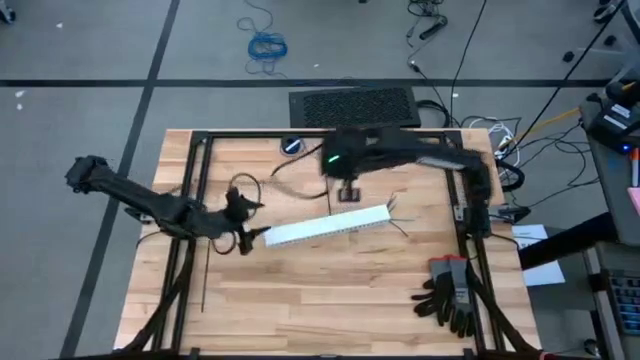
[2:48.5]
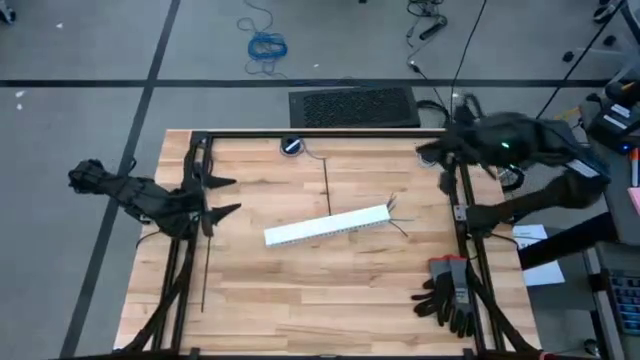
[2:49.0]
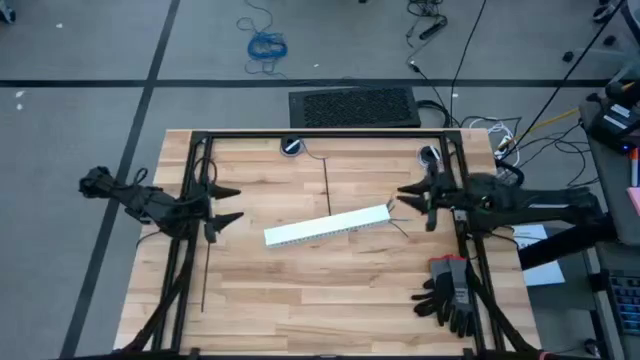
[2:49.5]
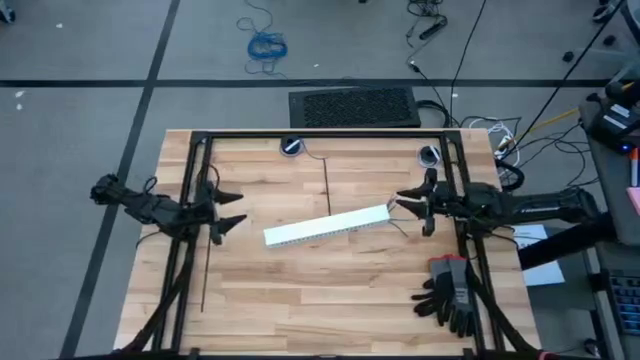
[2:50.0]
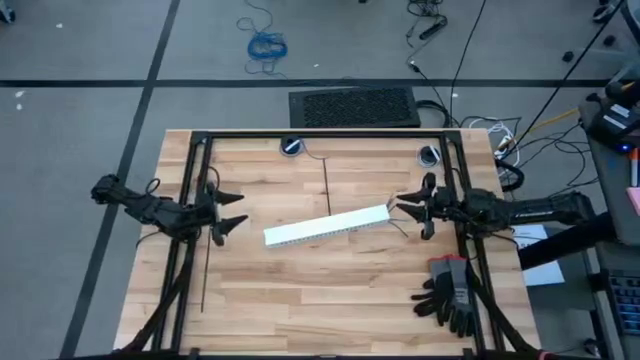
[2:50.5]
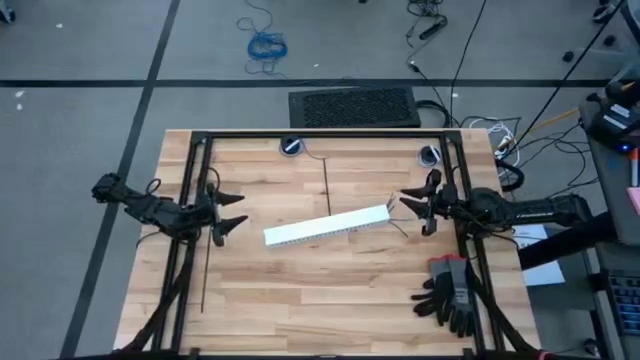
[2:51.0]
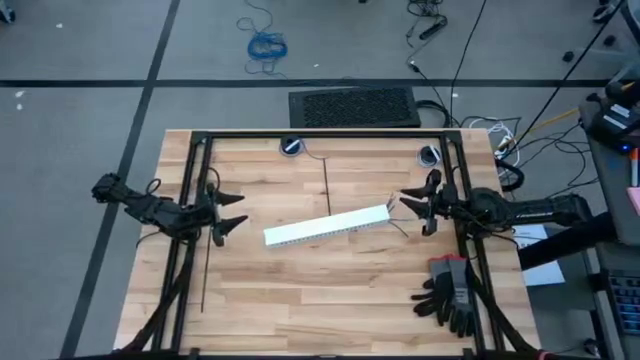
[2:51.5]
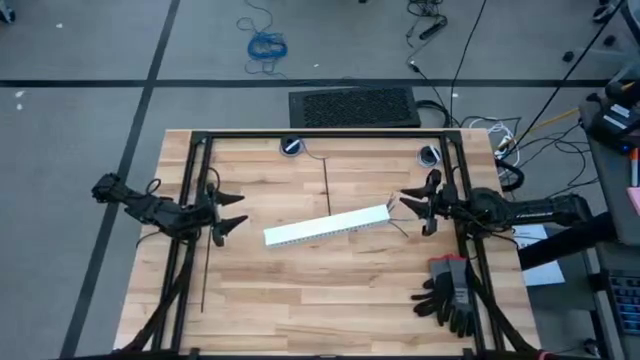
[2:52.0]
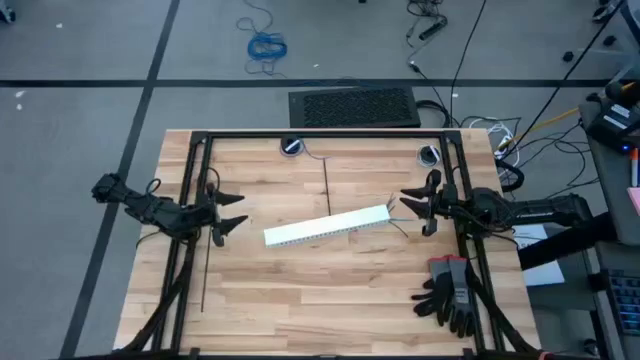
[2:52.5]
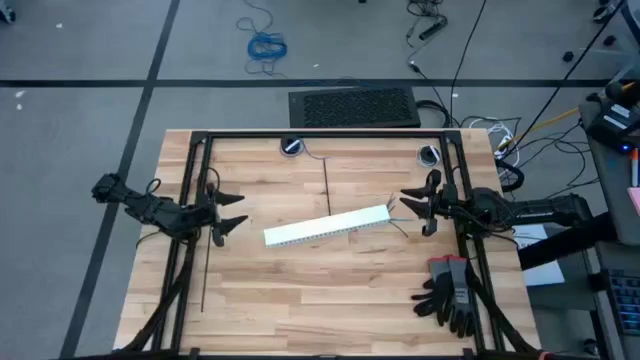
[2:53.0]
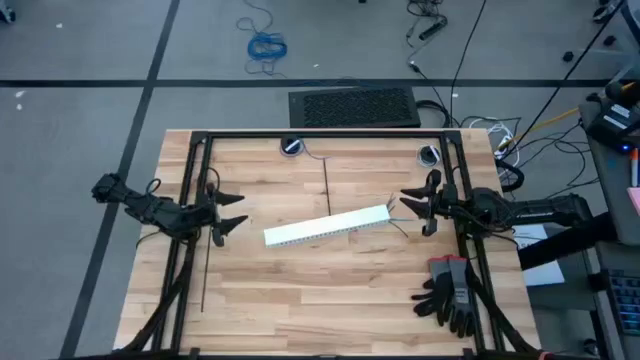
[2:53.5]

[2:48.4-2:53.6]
Task: Ziptie cables
Return to Home Position

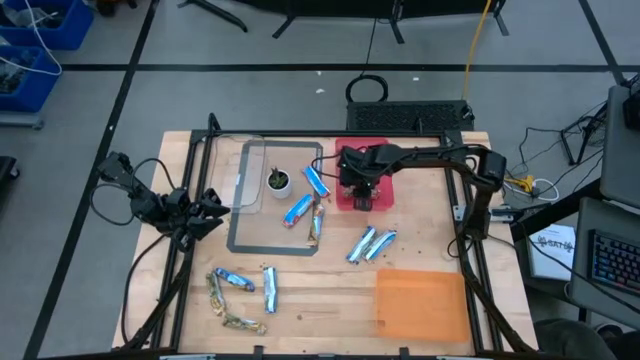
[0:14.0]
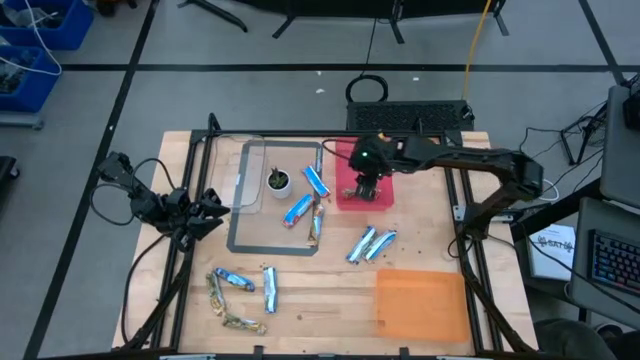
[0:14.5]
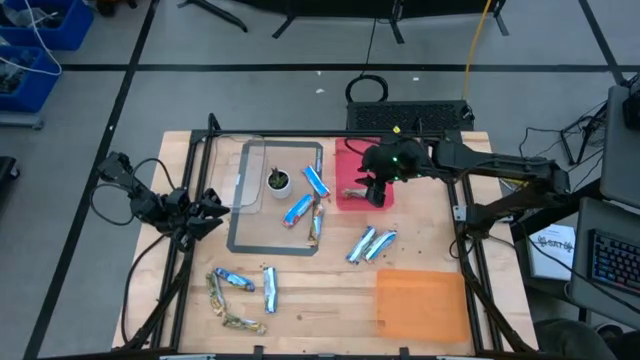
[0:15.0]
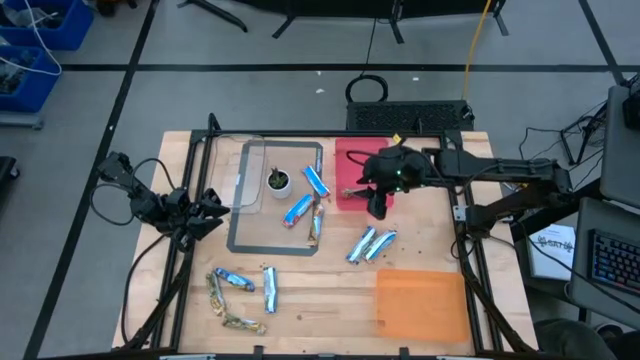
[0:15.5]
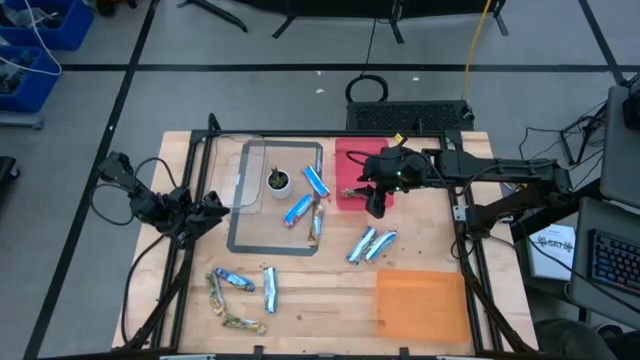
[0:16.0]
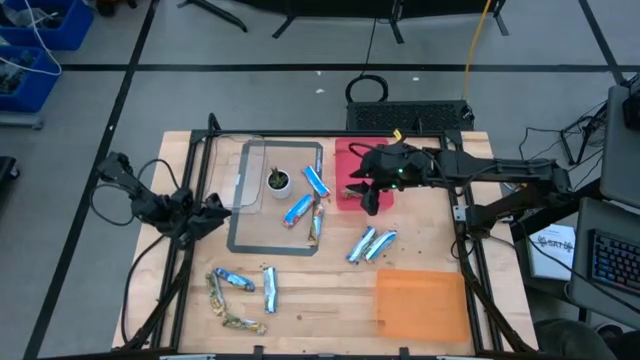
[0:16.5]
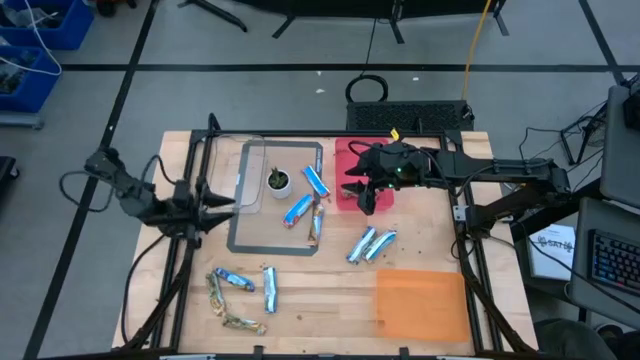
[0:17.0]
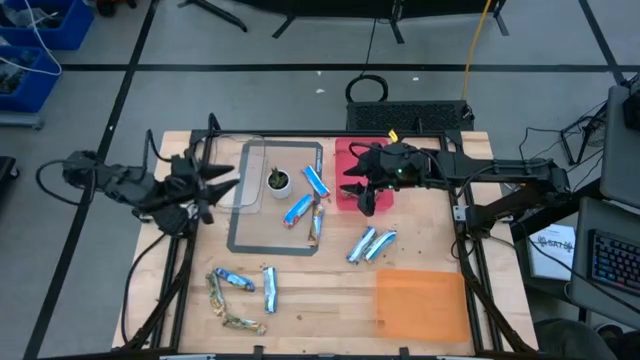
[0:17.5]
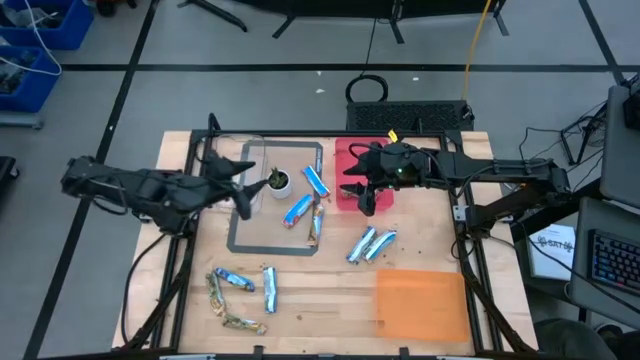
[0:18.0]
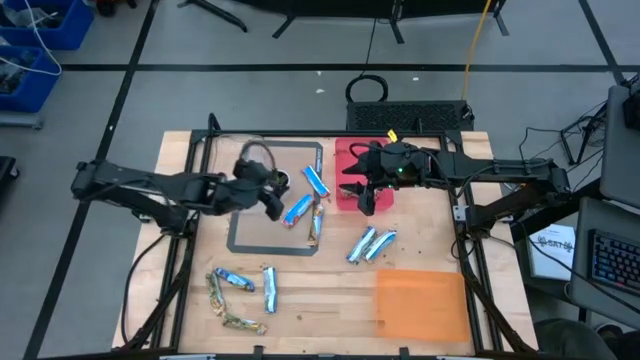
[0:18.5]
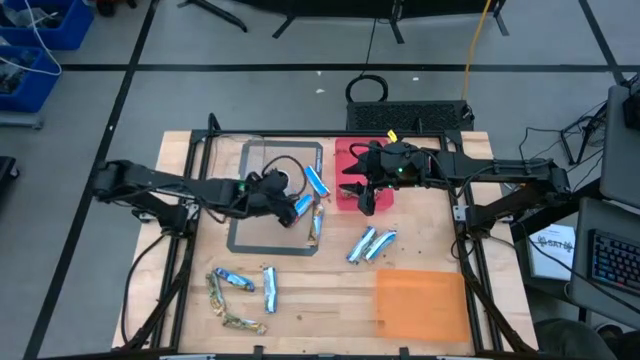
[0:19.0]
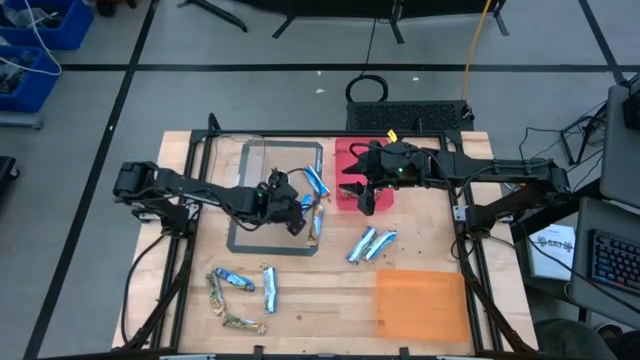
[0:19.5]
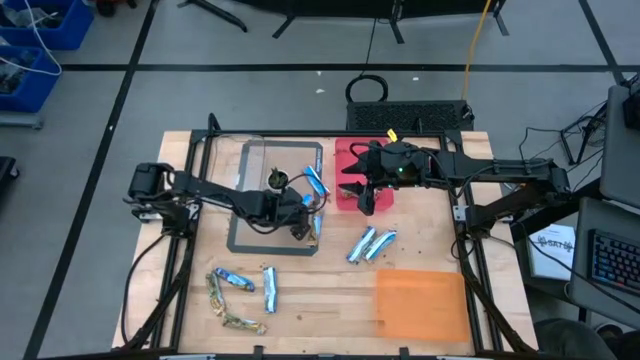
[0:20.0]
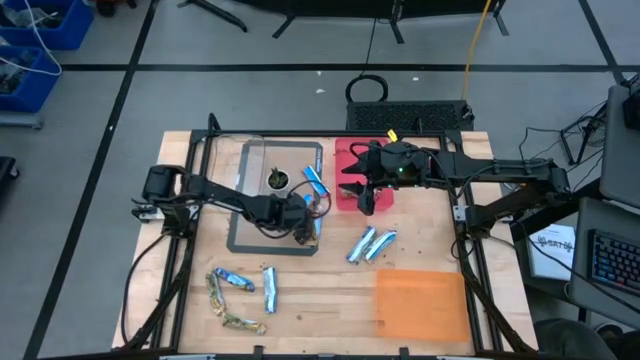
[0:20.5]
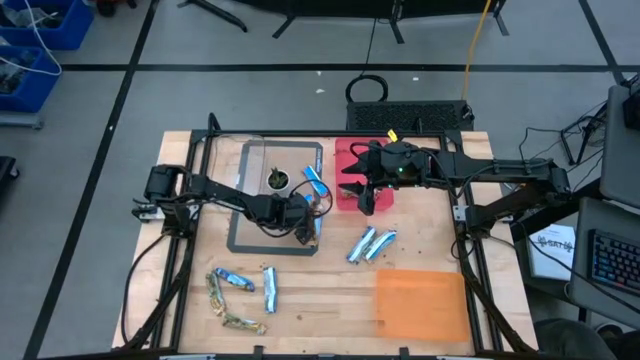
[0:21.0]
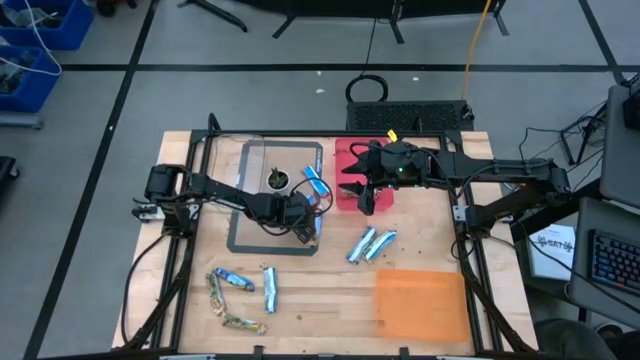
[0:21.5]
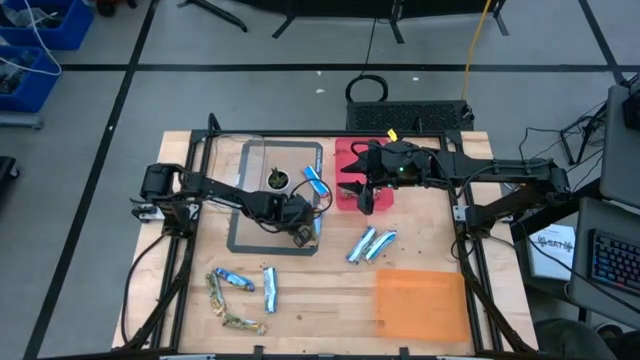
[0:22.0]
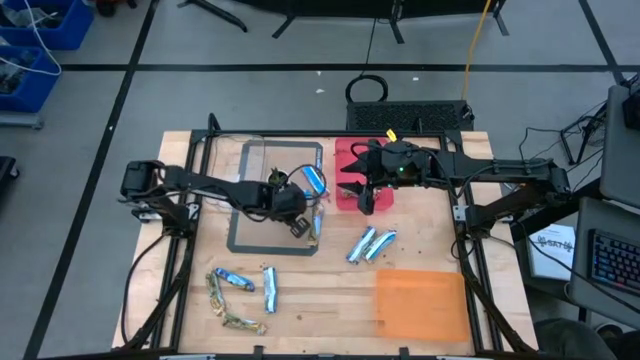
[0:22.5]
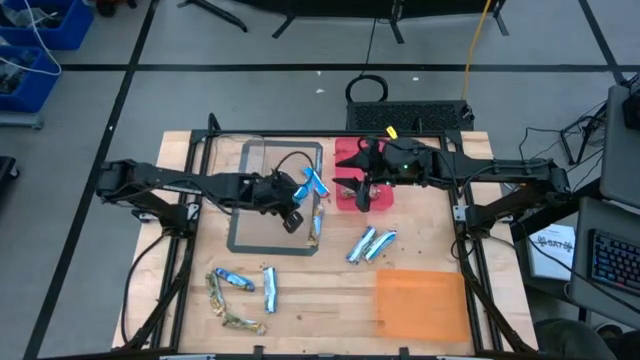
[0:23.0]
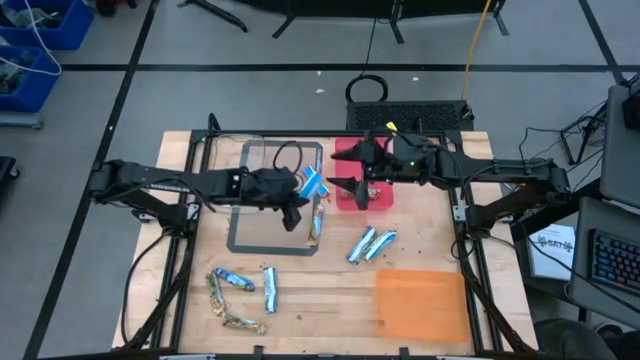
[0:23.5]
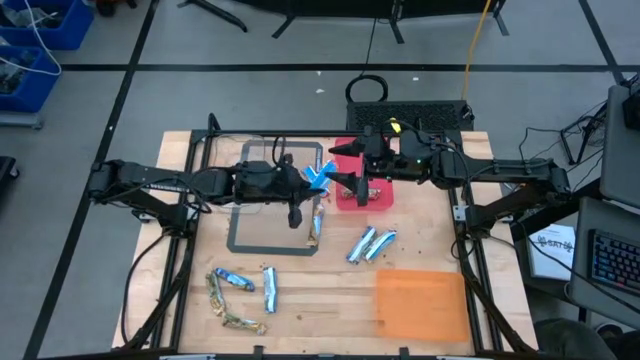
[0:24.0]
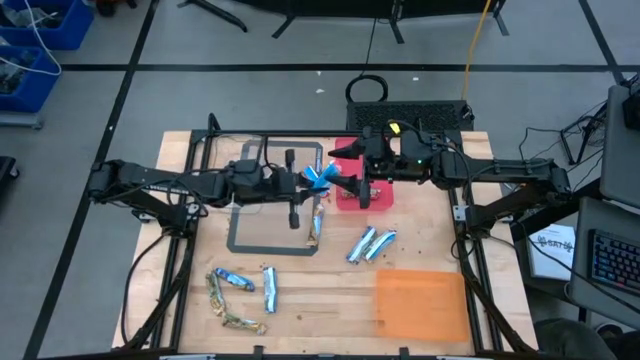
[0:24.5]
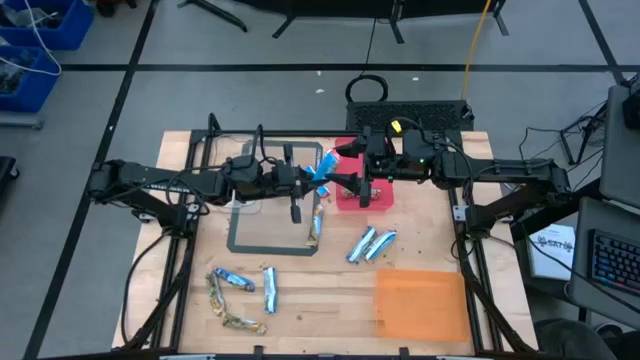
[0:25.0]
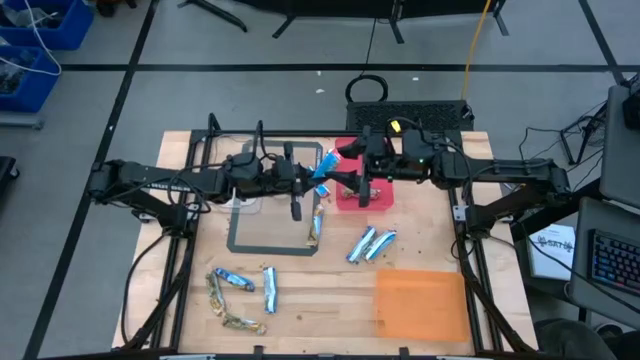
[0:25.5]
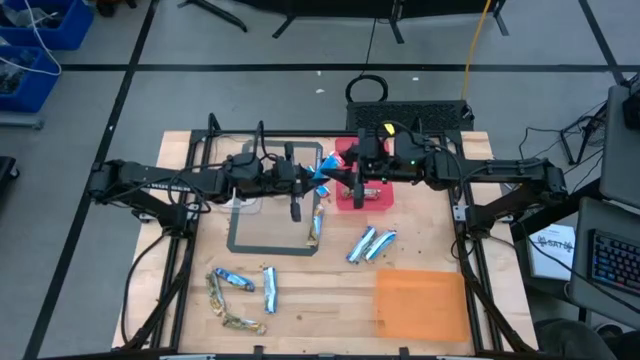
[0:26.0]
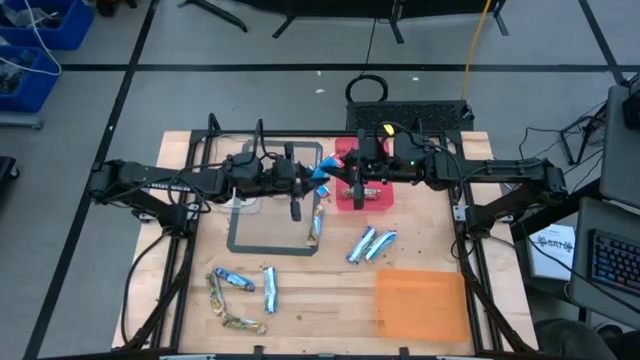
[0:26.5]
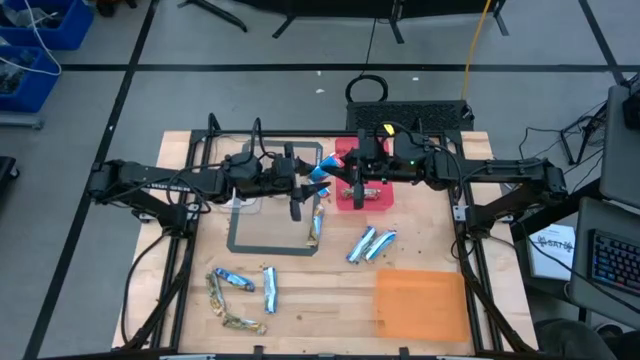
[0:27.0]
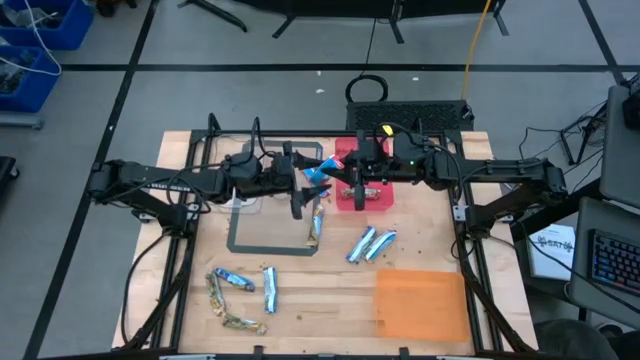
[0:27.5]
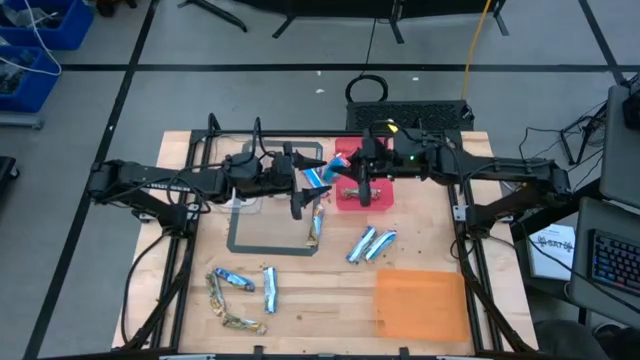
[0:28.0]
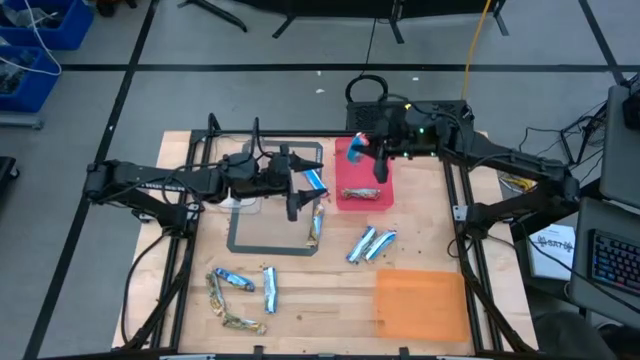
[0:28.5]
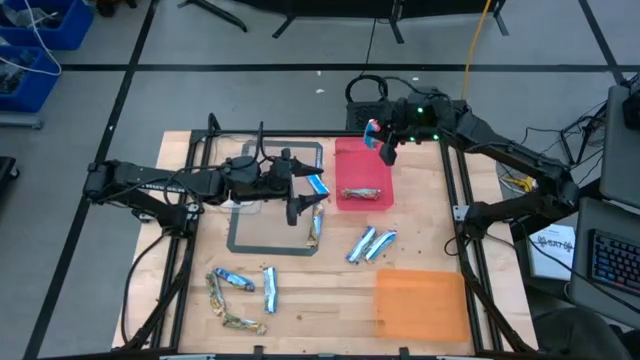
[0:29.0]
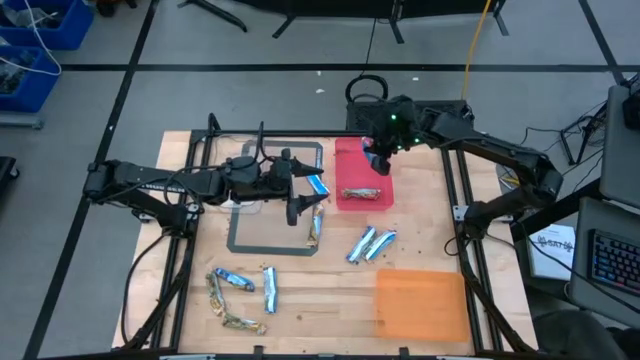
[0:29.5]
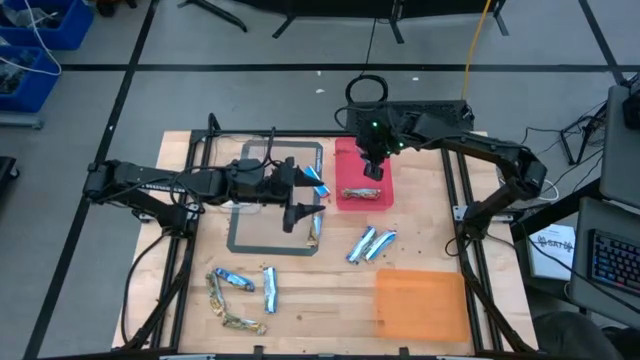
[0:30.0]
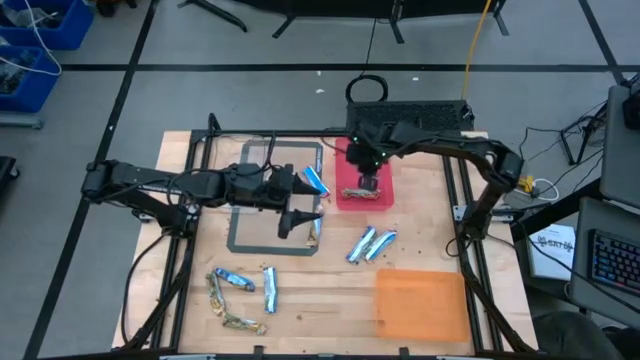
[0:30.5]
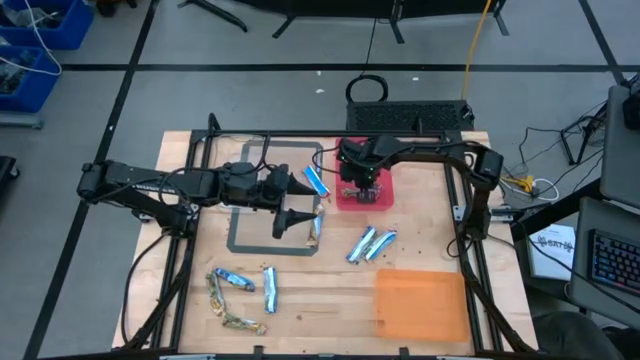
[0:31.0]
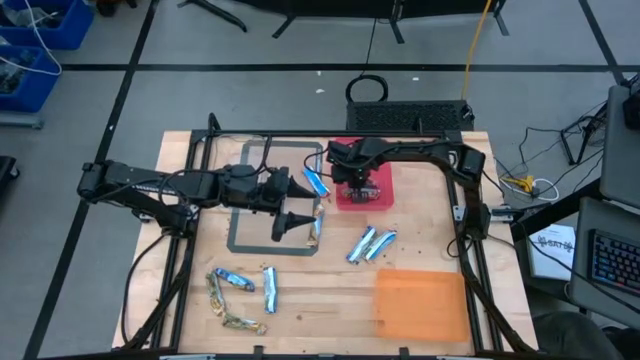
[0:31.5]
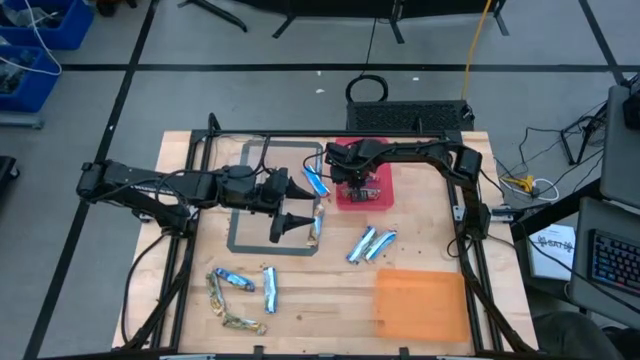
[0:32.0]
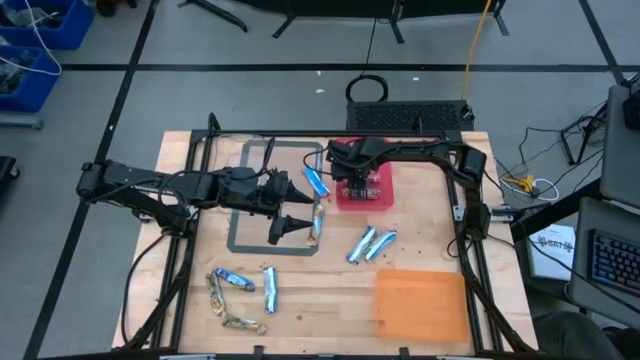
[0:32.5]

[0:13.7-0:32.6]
Task: Pick and place Granola Bars by type
Put the red granola bar into the red bin
